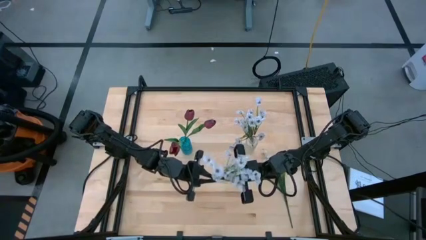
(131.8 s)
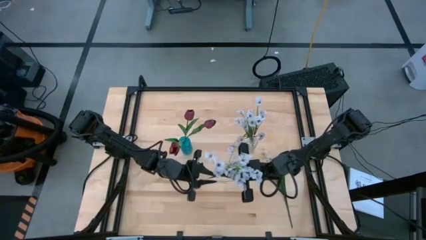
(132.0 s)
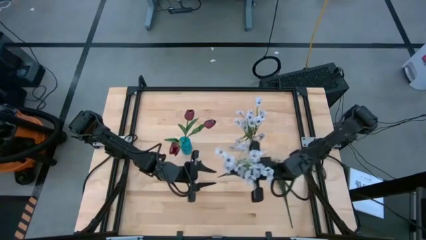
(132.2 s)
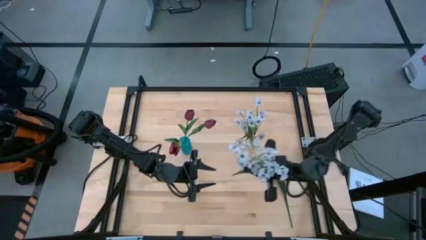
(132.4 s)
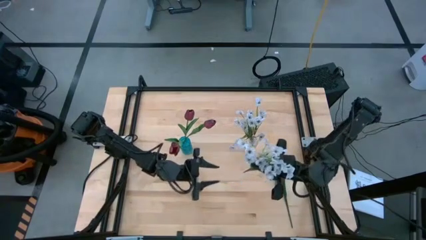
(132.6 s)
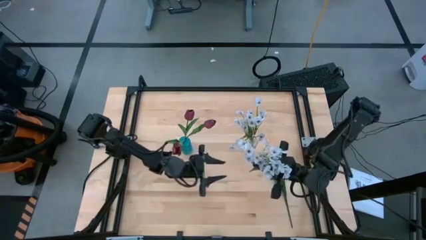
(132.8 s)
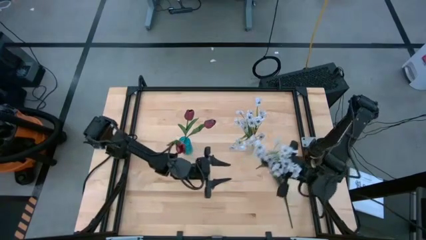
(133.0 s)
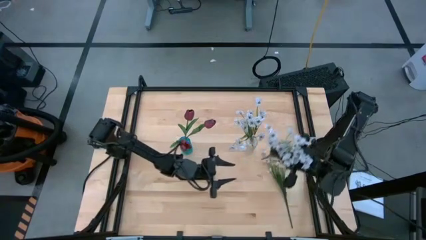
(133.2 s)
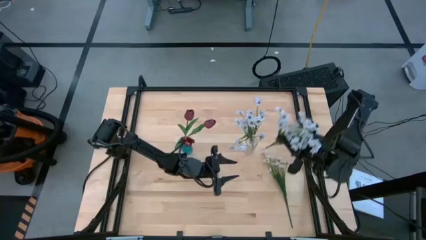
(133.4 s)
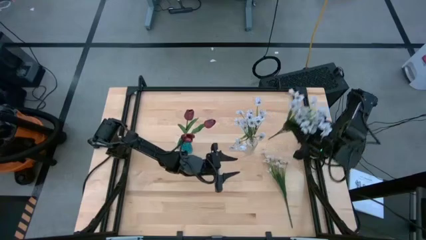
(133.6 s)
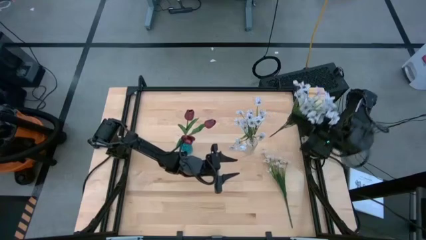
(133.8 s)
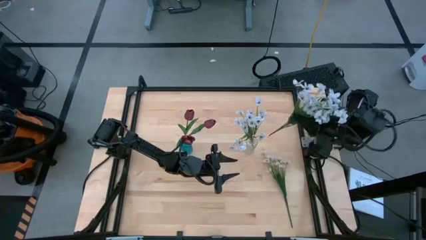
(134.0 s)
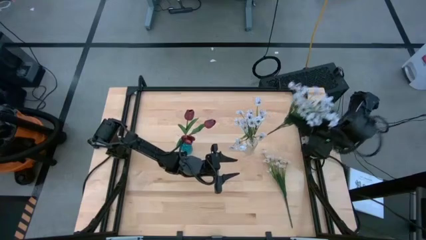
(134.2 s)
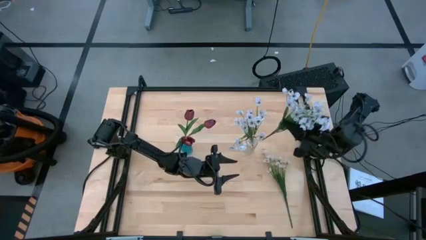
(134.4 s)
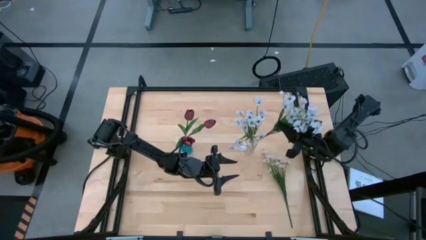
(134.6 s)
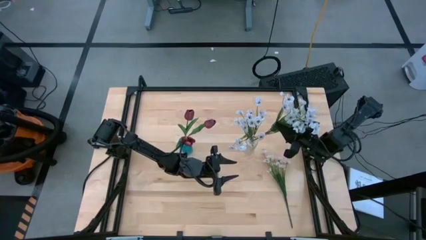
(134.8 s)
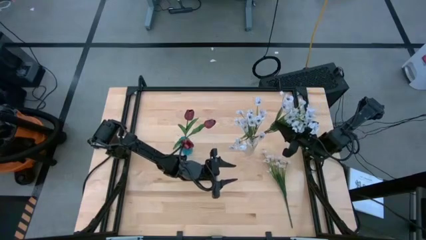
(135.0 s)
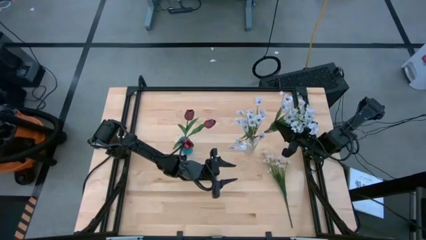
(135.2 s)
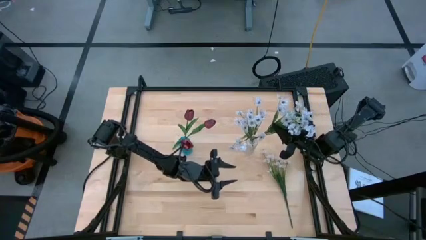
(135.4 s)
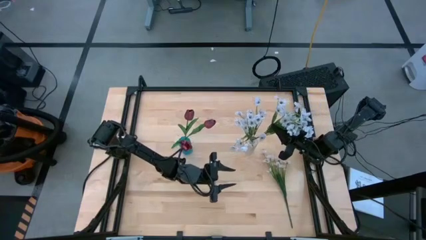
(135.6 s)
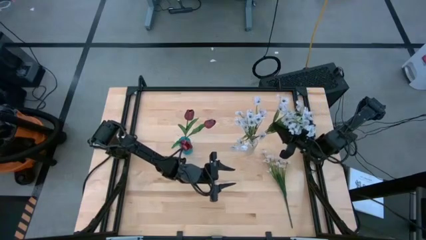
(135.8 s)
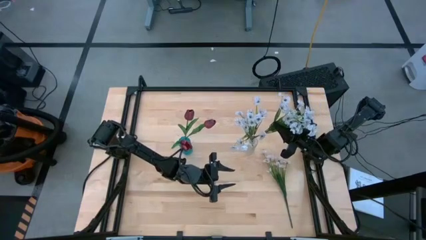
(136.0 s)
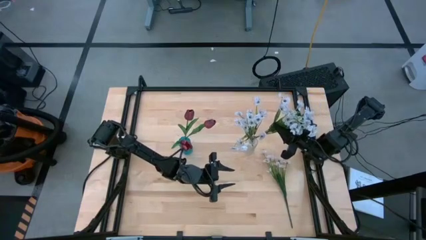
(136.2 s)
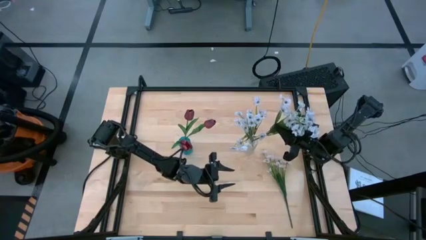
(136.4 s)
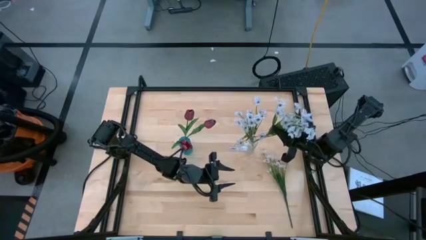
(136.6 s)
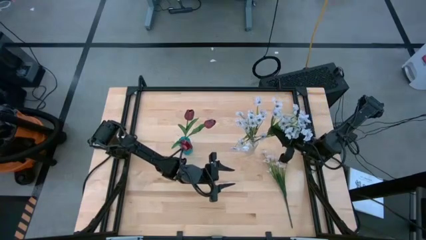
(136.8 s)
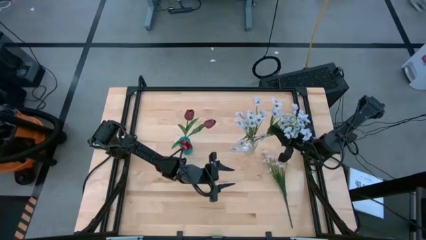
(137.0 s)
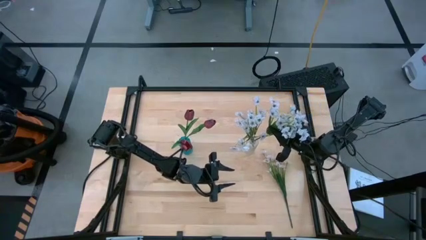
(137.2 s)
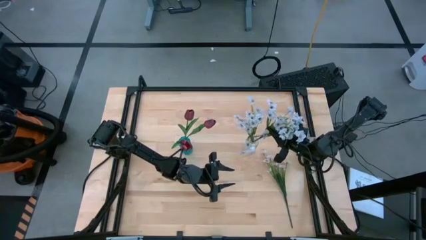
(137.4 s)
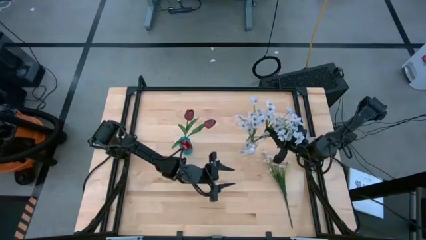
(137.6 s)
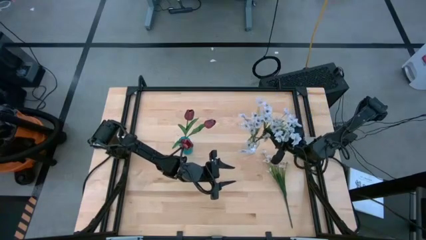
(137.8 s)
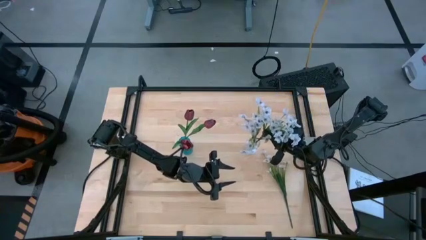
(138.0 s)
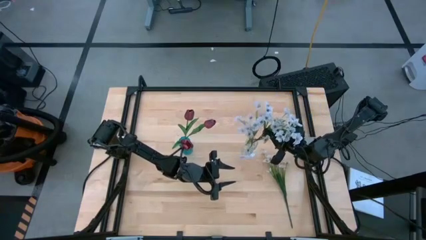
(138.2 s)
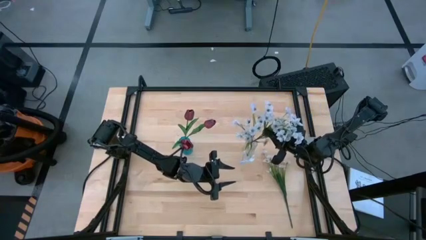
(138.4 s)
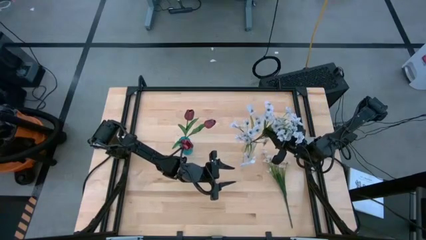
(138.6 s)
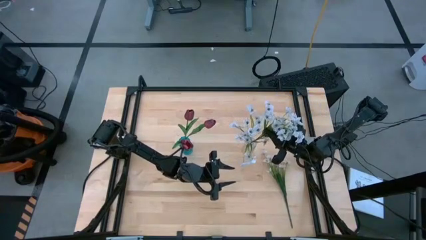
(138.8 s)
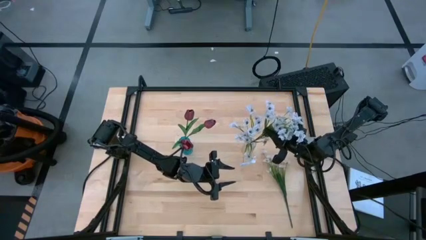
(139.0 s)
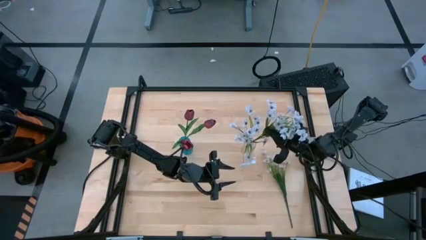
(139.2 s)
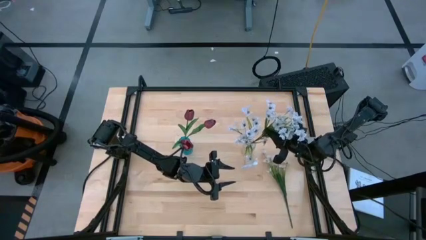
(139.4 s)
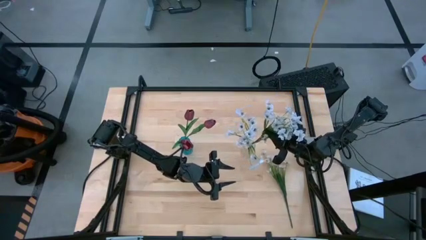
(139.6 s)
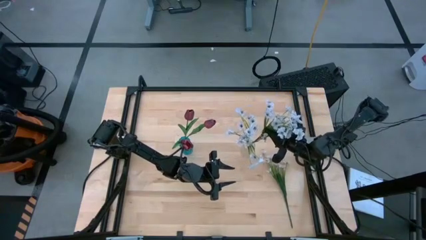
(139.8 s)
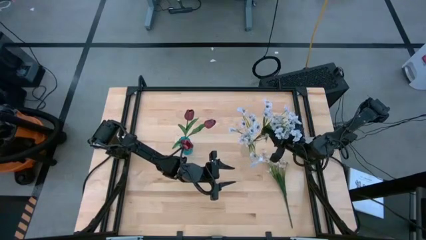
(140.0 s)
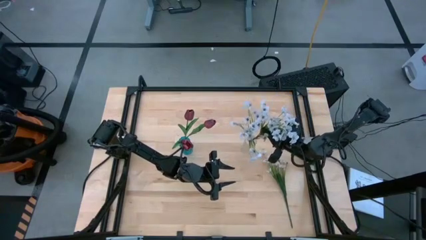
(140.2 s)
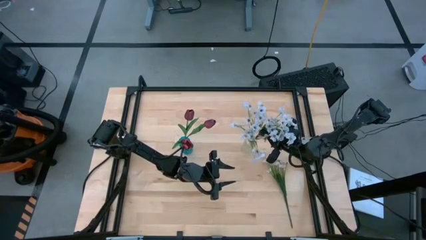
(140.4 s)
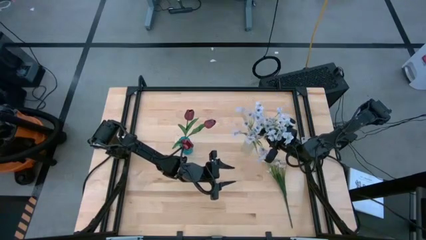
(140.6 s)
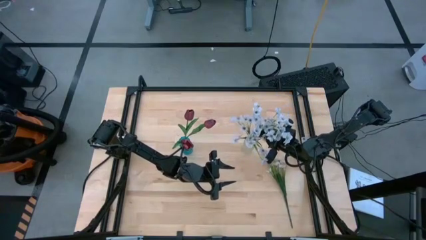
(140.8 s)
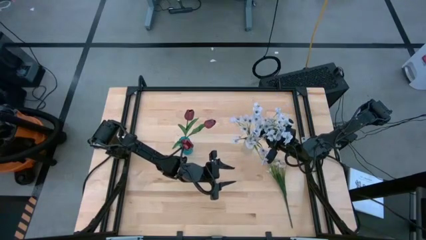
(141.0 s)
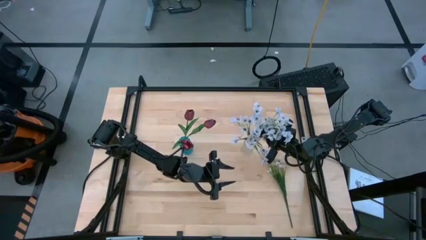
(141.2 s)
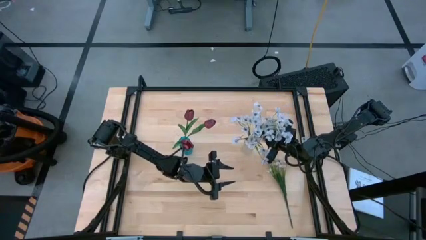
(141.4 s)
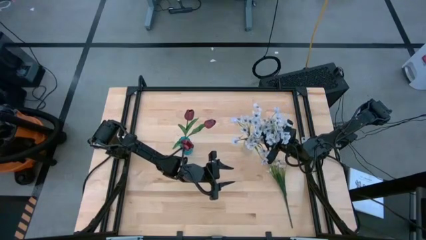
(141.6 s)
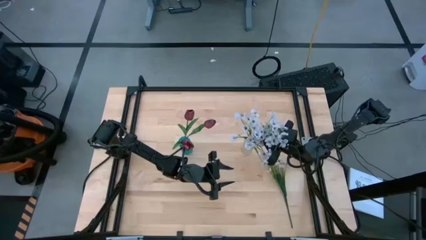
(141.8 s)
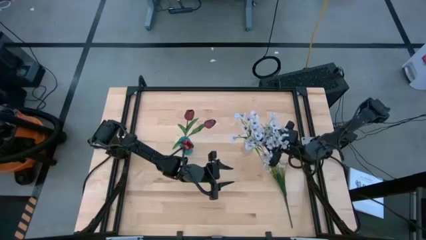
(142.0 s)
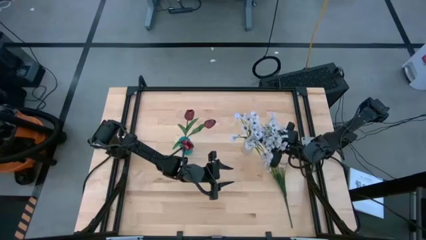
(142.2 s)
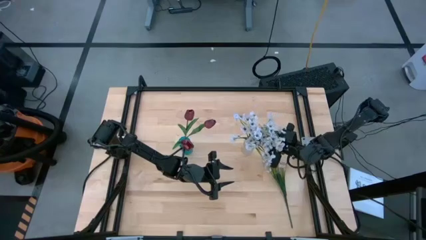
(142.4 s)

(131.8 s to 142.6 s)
Task: Sort flowers into vase by color
Put the white daisies into the transparent vase

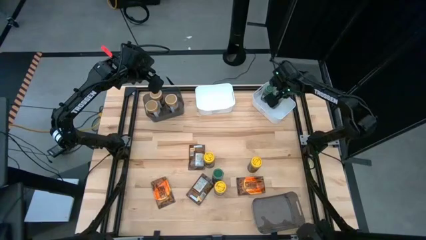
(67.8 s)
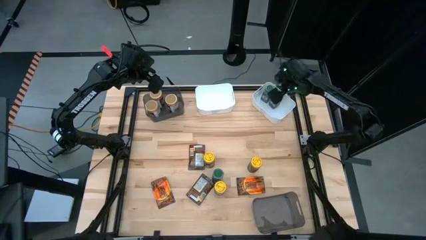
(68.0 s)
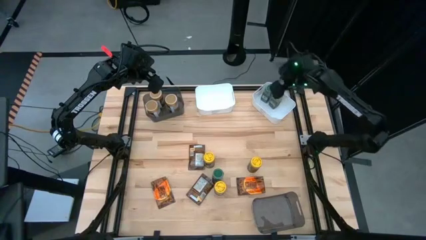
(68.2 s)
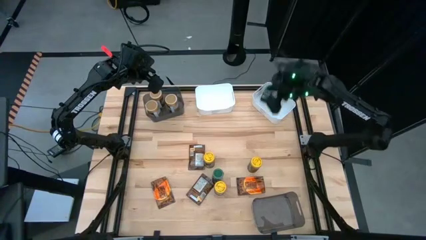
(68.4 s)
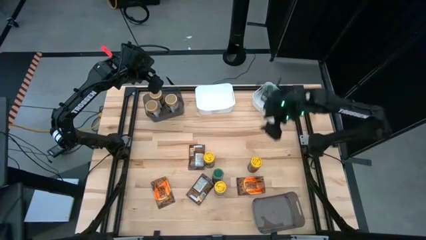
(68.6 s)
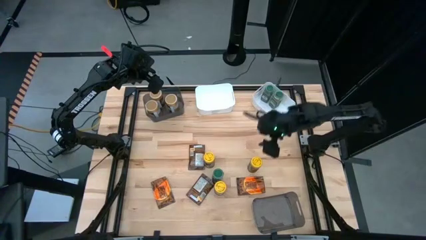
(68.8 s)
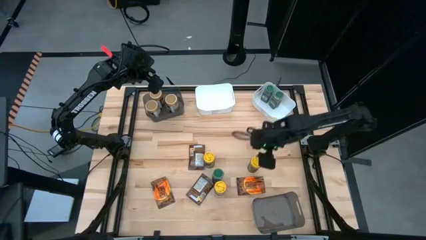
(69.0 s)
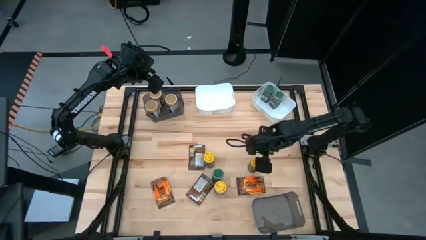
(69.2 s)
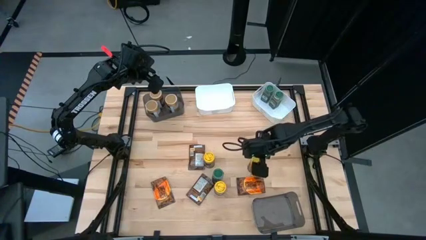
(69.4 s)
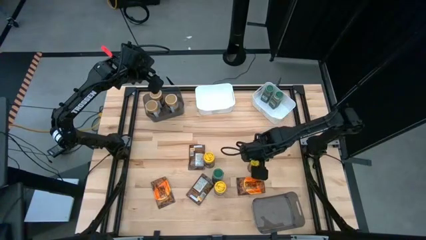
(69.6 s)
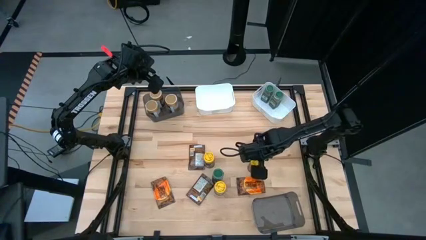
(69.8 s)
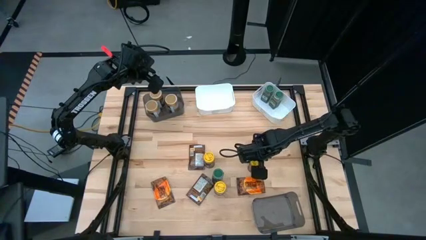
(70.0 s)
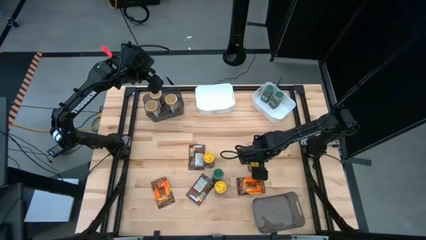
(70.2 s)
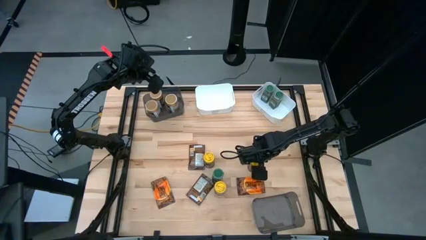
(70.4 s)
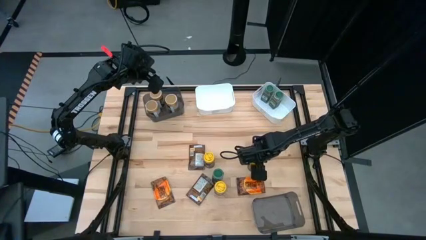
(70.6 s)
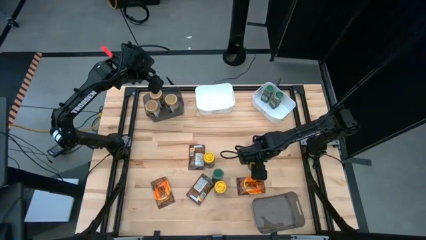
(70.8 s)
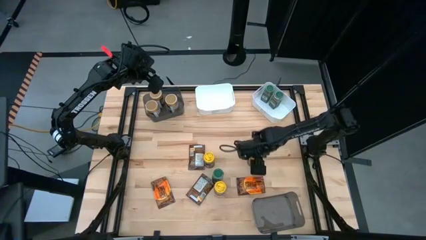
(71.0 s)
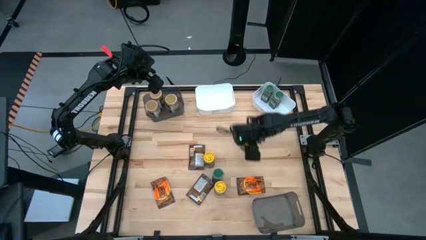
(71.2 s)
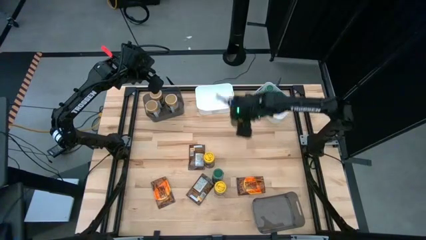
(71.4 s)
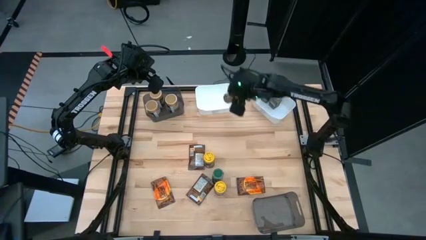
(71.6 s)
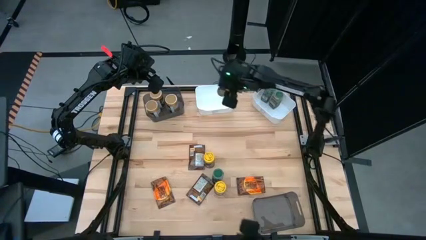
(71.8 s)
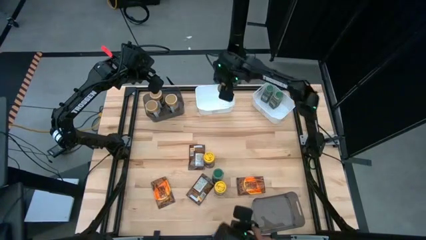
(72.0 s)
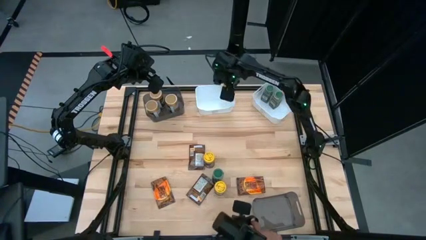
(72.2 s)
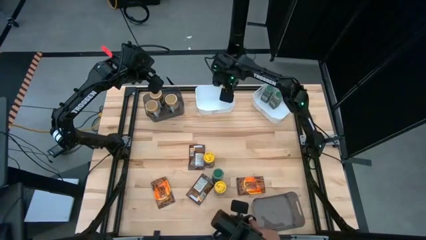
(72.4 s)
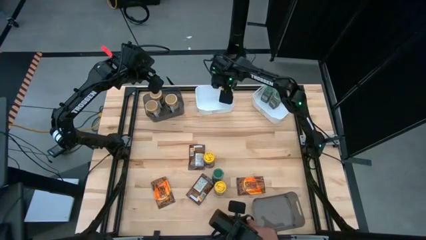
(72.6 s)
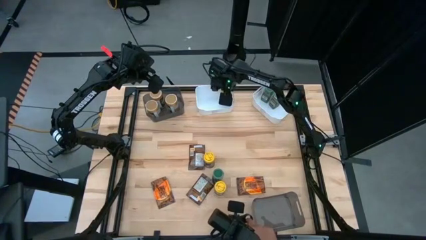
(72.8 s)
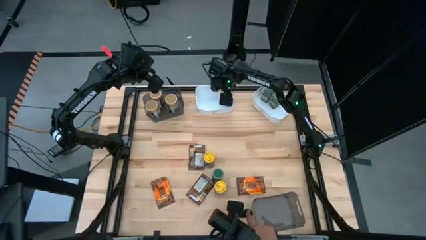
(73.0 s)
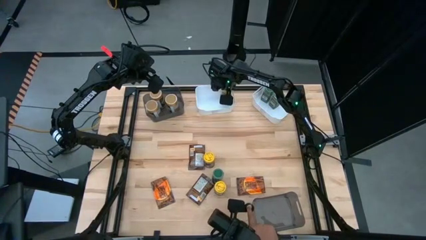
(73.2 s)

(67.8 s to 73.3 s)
Task: Sort spices by type
Put the yellow seasoning bottle into the left white bin
